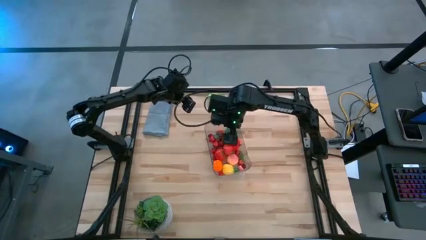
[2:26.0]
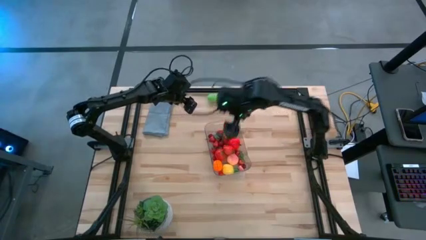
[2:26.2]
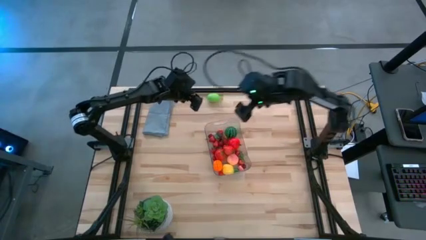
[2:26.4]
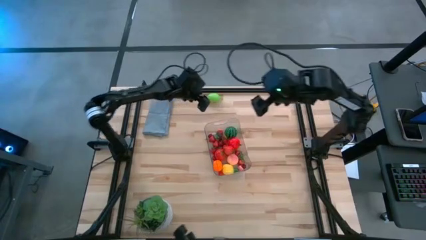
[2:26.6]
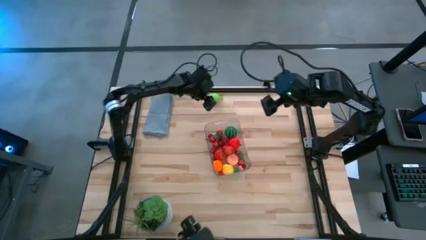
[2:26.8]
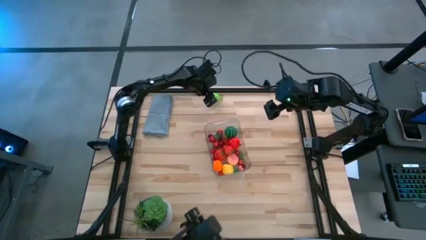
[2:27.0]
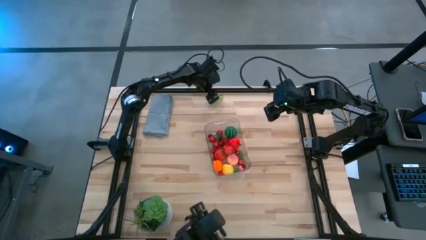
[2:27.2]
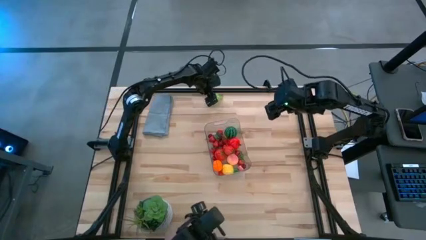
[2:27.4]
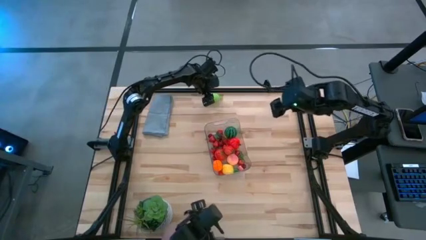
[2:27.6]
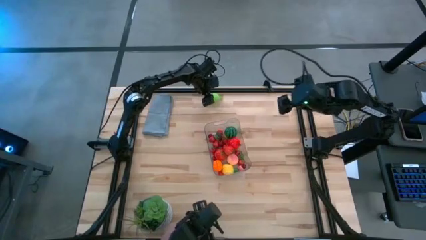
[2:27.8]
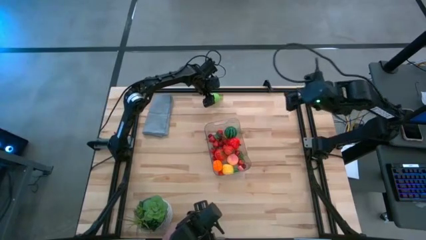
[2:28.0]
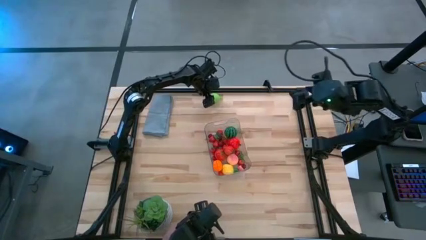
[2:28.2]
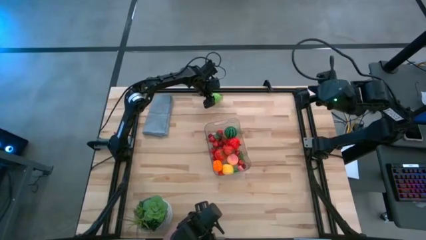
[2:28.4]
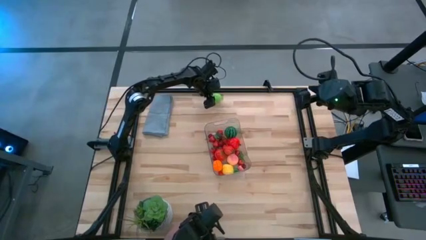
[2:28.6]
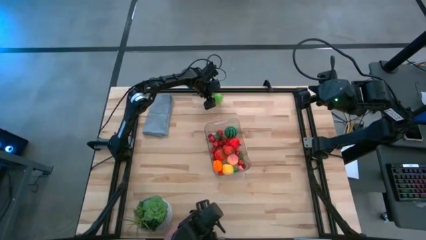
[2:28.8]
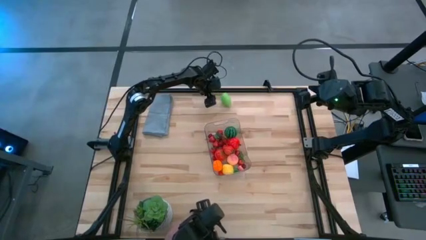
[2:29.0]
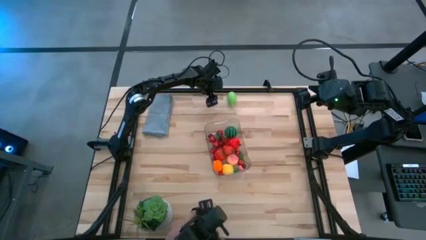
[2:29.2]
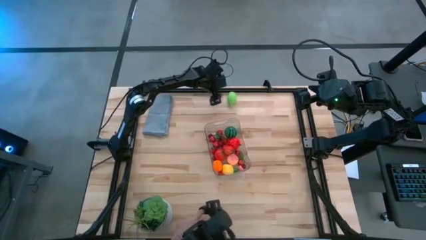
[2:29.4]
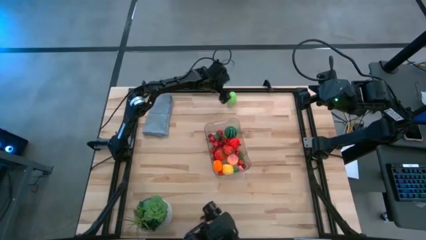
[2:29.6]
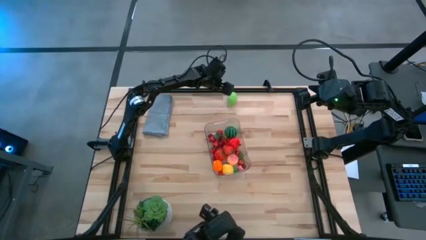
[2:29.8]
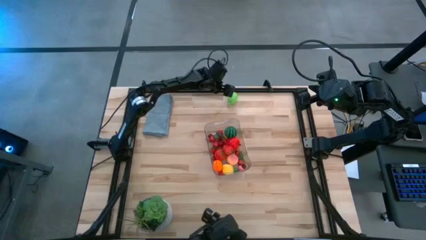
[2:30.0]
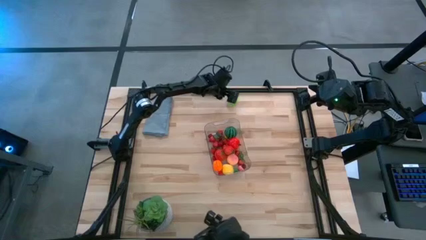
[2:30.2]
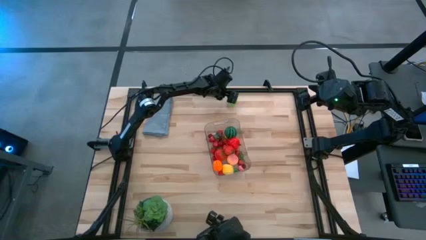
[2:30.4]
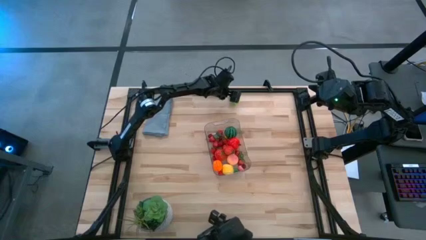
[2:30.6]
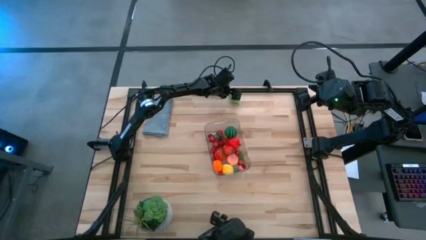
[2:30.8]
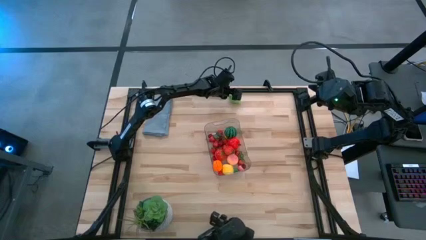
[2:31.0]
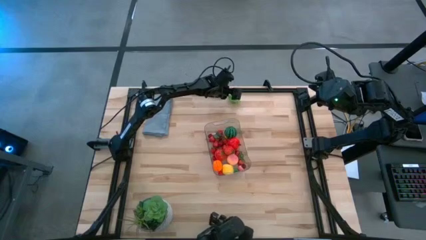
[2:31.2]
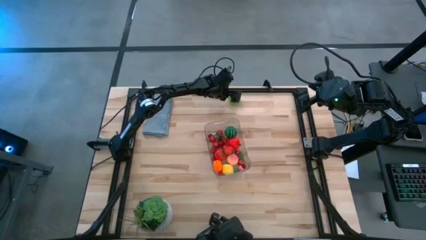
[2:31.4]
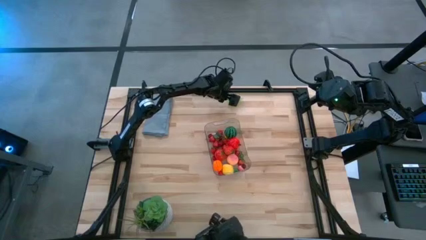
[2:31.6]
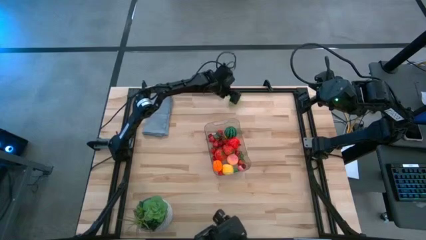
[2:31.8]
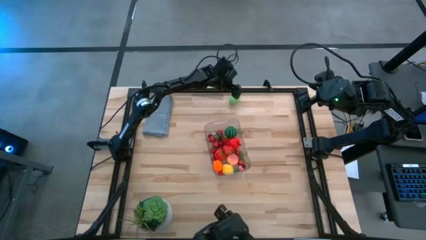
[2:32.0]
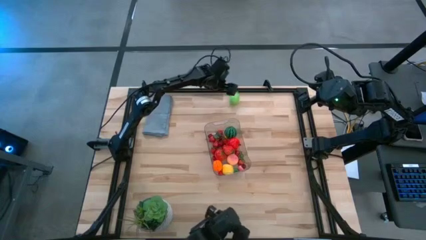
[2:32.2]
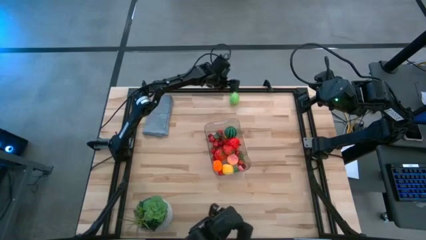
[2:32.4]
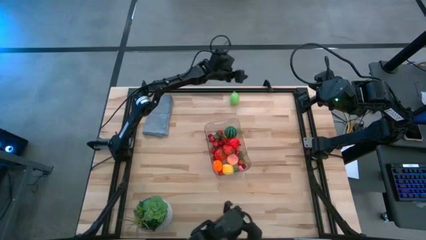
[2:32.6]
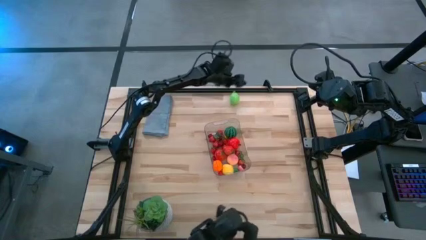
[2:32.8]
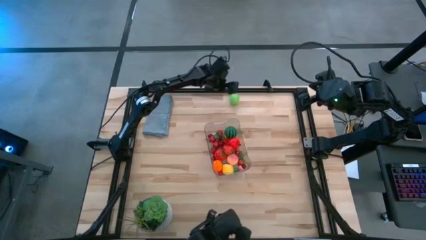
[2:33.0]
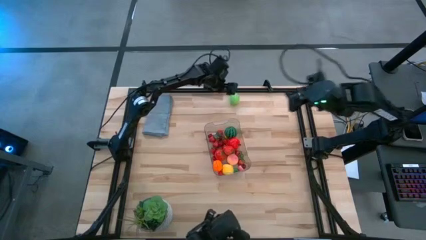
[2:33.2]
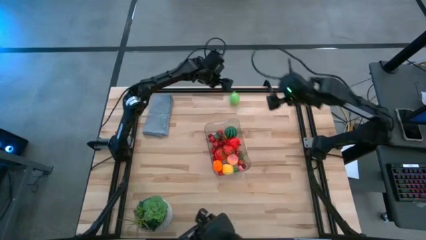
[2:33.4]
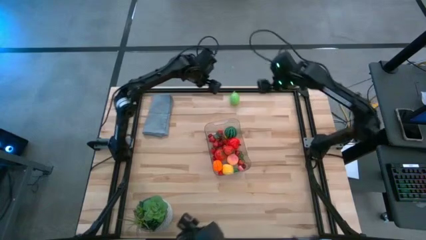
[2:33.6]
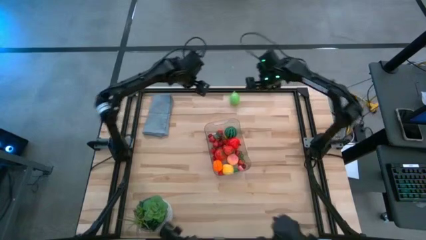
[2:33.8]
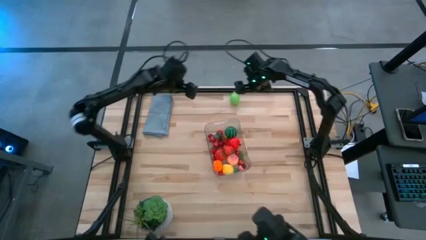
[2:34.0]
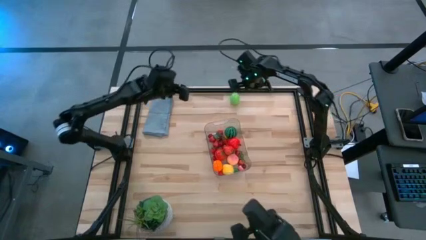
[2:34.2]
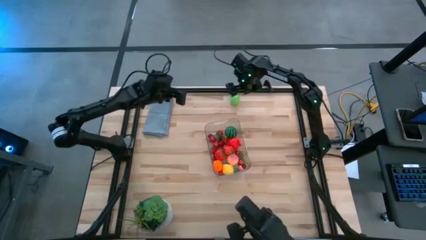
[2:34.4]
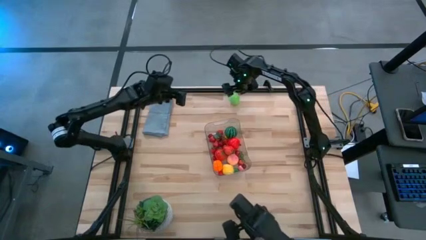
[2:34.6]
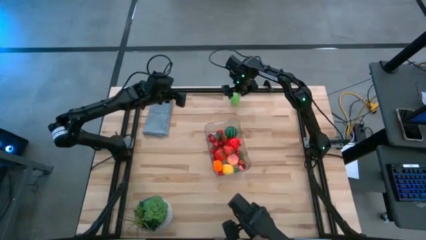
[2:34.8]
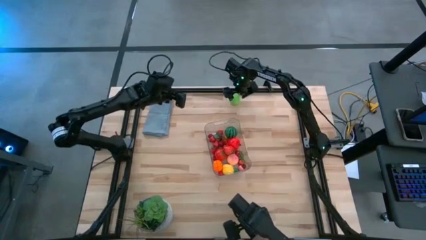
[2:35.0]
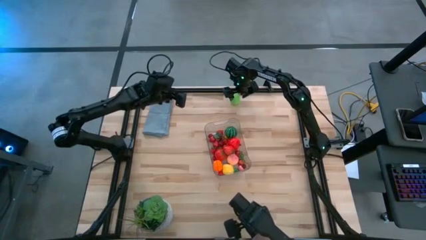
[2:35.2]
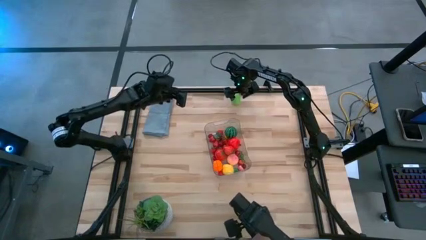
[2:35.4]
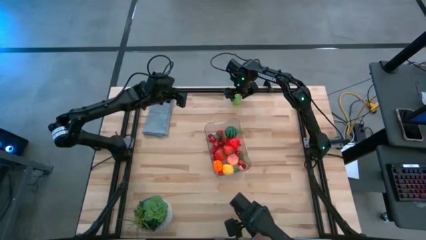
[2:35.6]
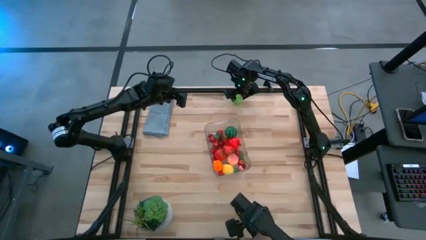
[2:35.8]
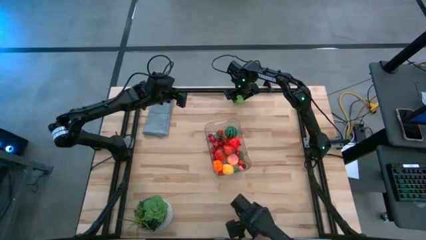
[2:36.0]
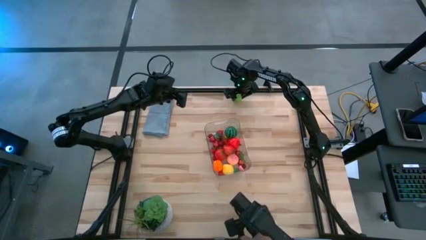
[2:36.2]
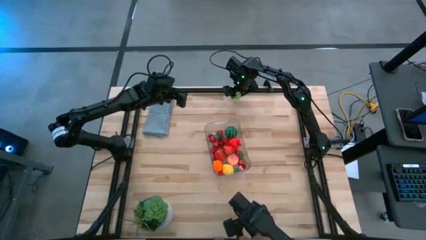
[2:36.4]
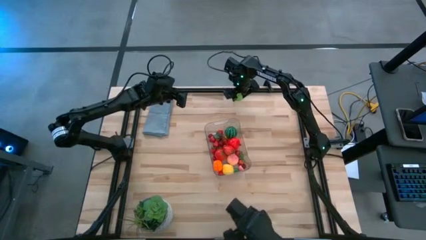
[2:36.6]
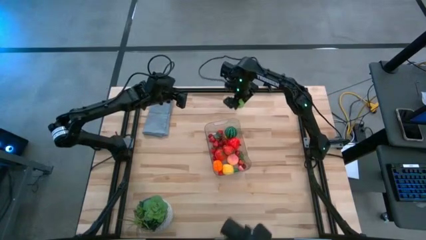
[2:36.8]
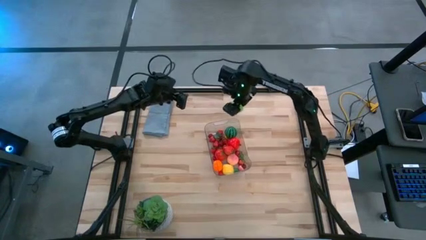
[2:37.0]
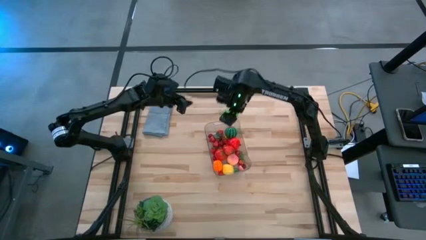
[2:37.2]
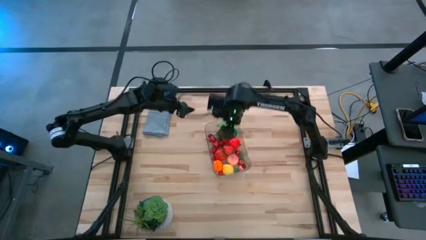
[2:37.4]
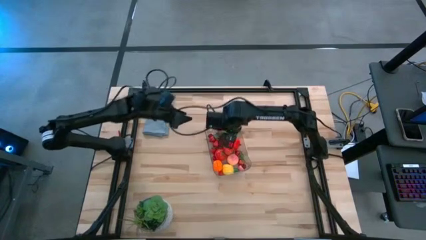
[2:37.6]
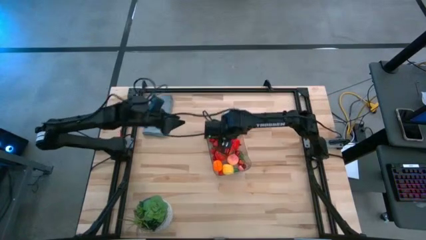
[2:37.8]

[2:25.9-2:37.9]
Task: Pick and placing Produce into tupperware
Put the green melon into the transparent bin

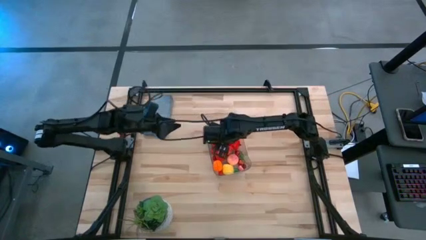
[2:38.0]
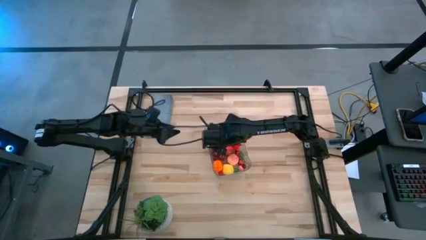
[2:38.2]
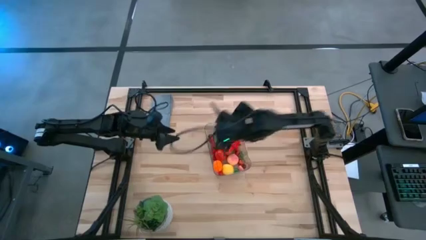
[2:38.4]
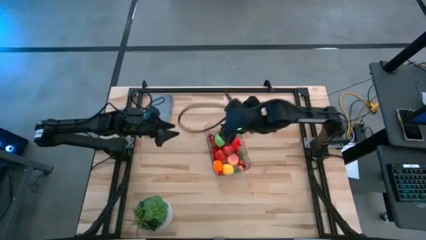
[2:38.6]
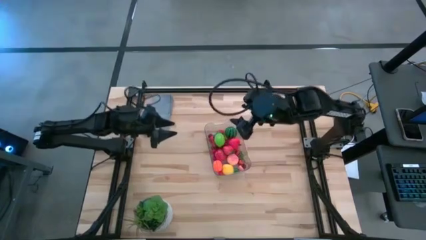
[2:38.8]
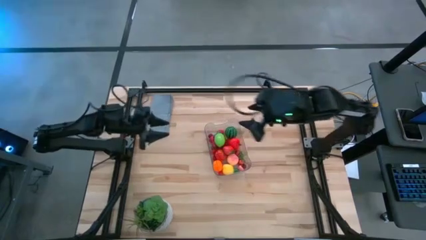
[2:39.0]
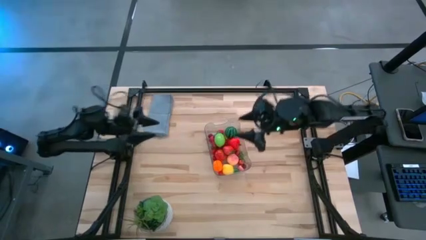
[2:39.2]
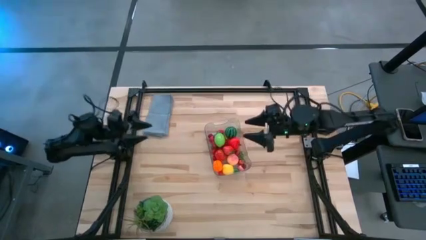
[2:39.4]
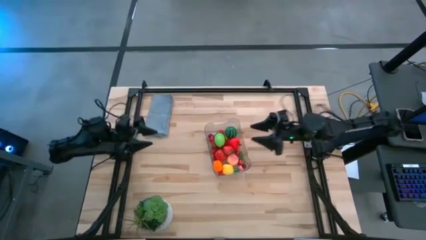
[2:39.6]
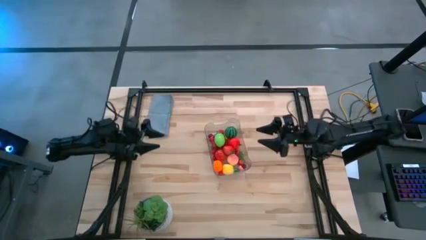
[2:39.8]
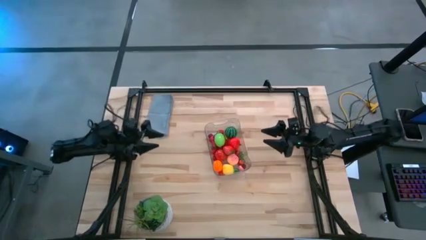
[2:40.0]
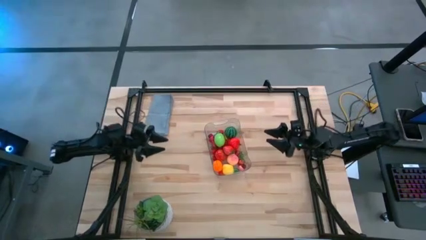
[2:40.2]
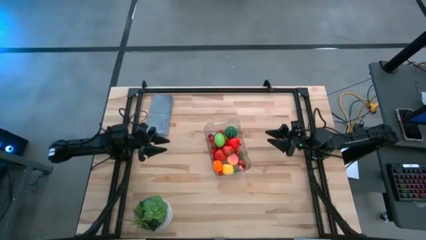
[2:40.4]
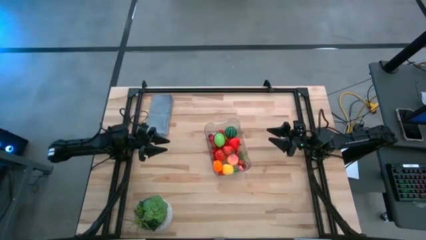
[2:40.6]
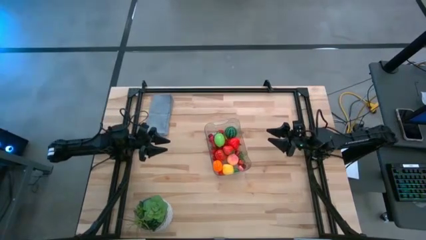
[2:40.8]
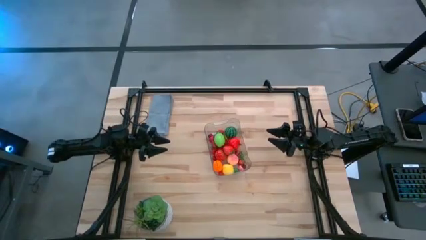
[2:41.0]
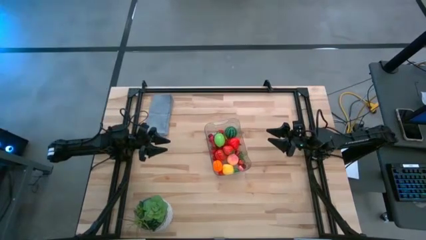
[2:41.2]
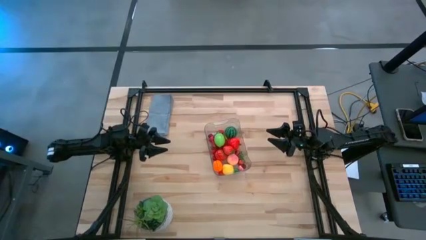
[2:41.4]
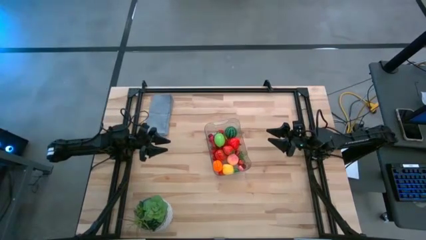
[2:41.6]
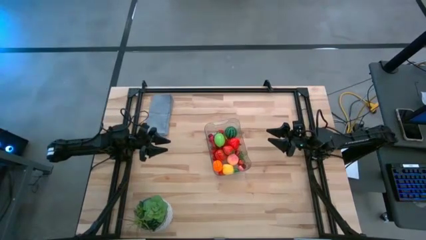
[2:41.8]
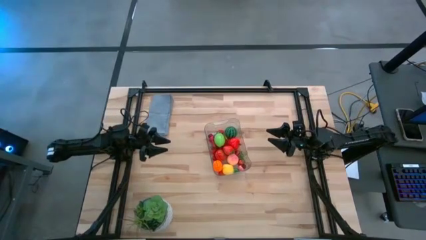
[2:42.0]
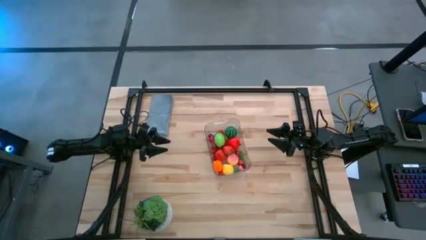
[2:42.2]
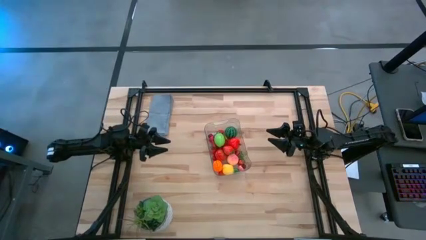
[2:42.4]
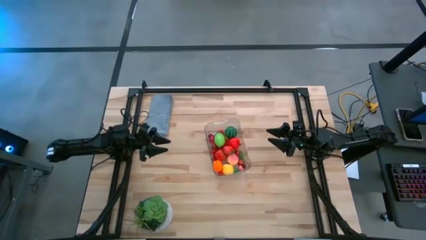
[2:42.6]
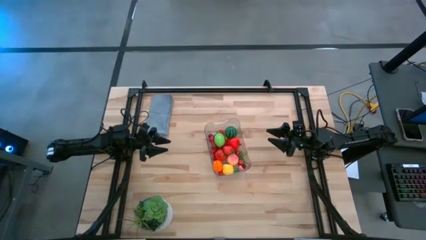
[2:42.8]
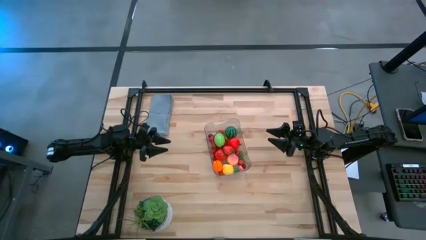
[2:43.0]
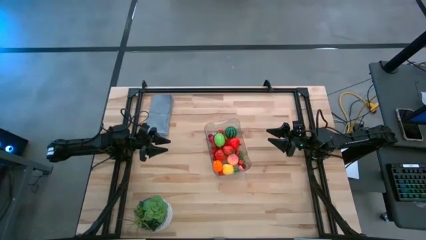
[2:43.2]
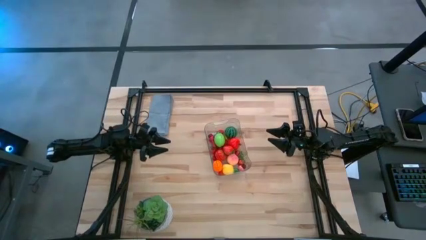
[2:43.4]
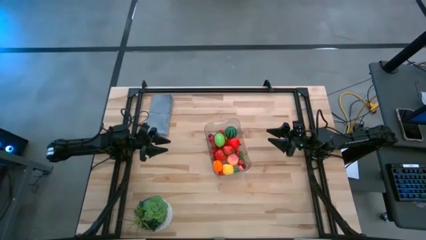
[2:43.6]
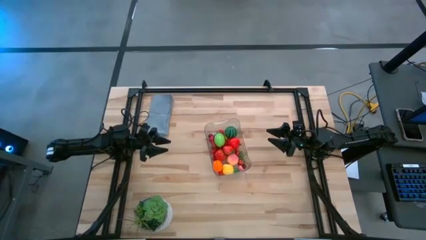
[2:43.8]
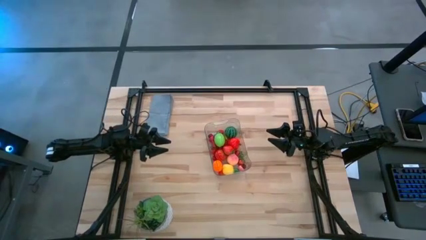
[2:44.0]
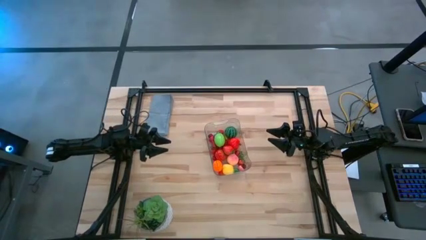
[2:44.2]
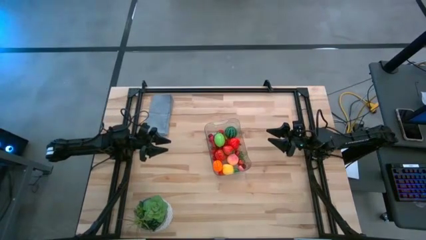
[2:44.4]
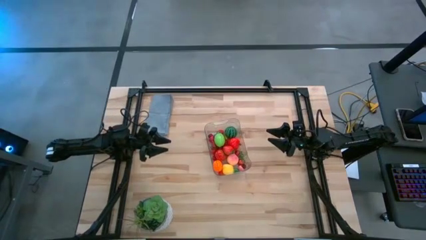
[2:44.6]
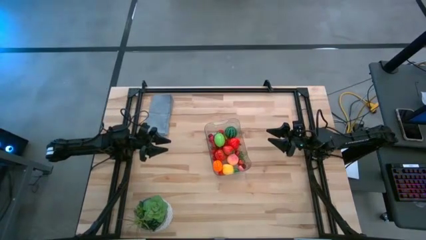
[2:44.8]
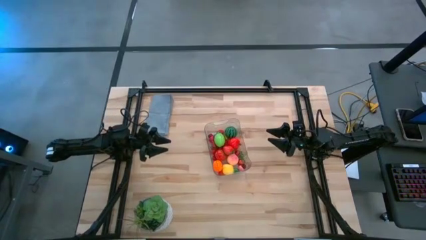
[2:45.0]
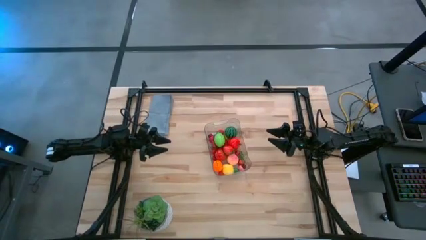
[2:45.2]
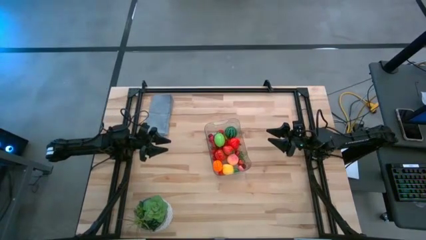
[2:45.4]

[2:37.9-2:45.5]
Return to Home Position
